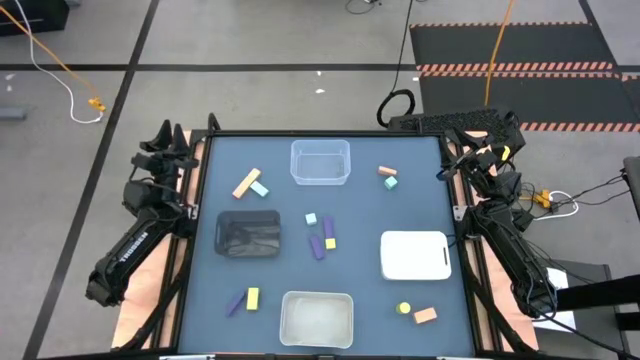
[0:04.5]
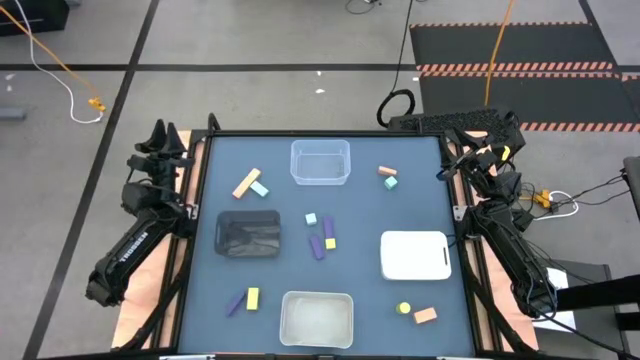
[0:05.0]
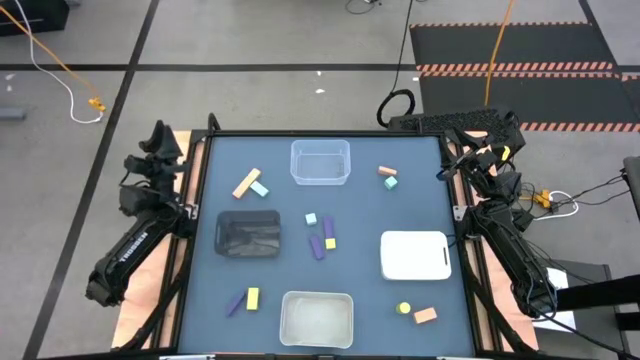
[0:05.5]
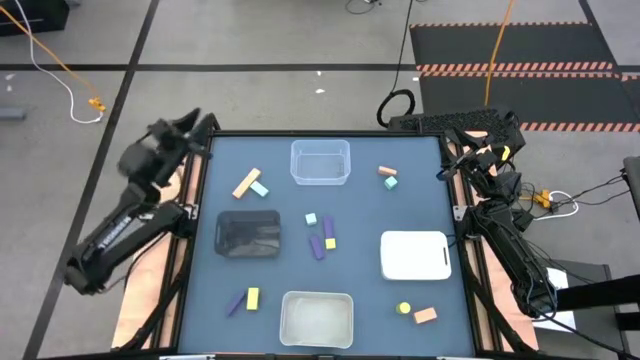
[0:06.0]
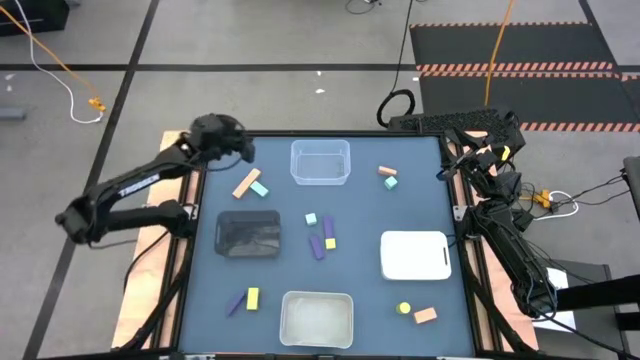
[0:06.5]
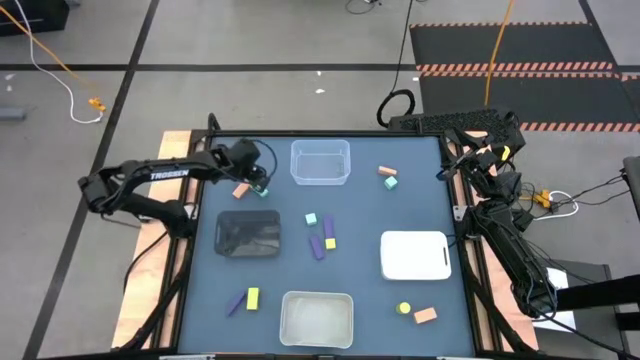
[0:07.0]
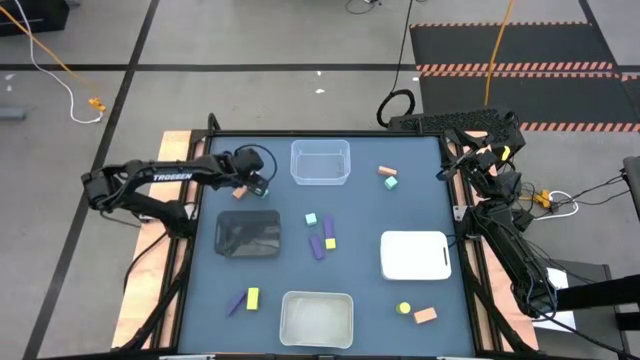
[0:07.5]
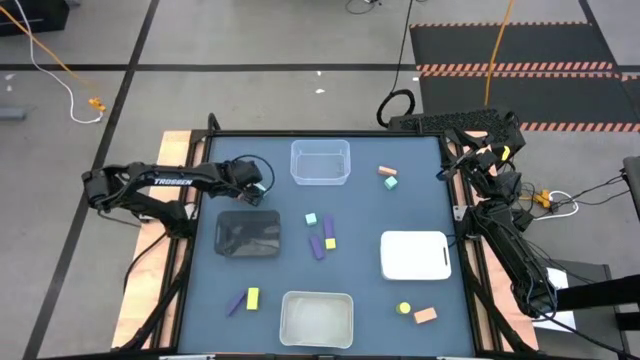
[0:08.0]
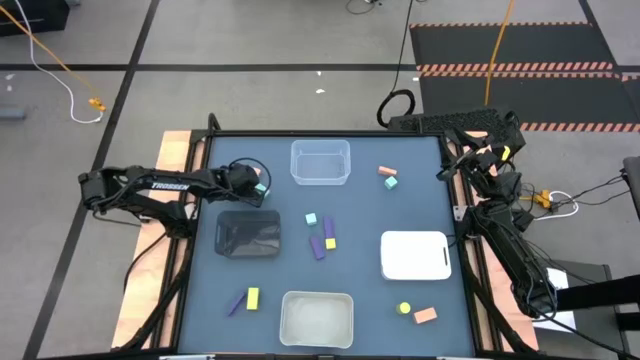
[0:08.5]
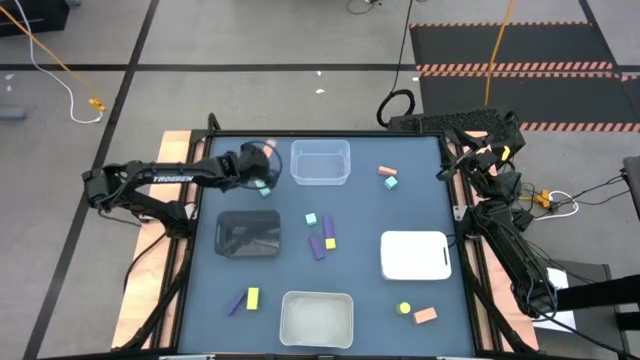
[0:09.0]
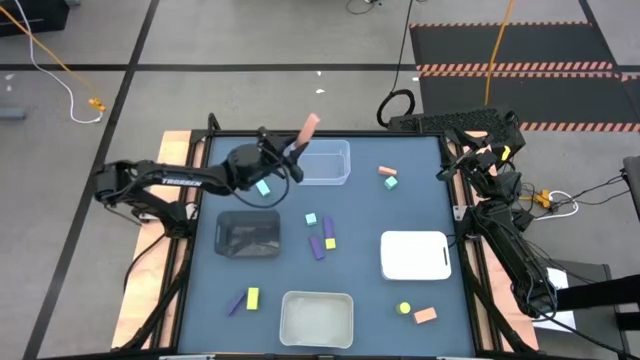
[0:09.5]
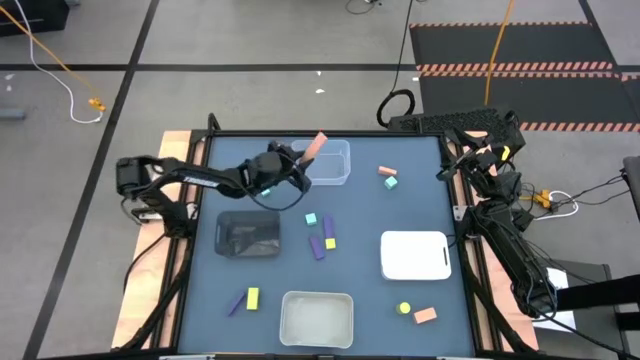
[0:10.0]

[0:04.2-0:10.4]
Task: Sort & place blocks by color
Put the top left orange block into the transparent bin

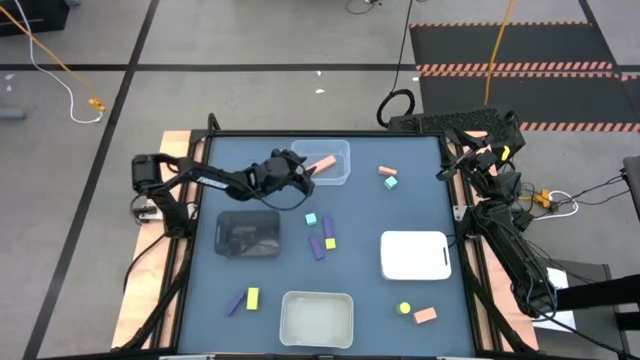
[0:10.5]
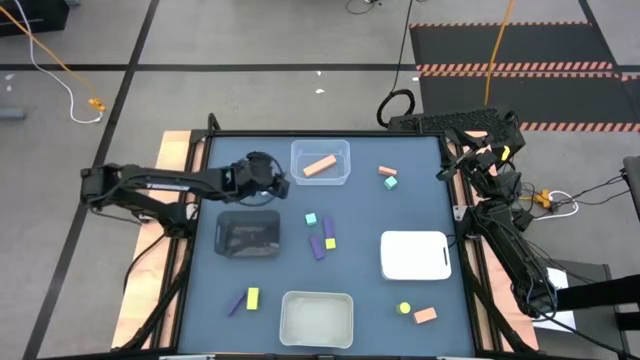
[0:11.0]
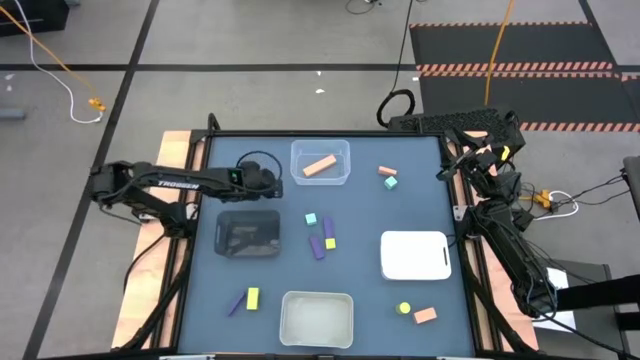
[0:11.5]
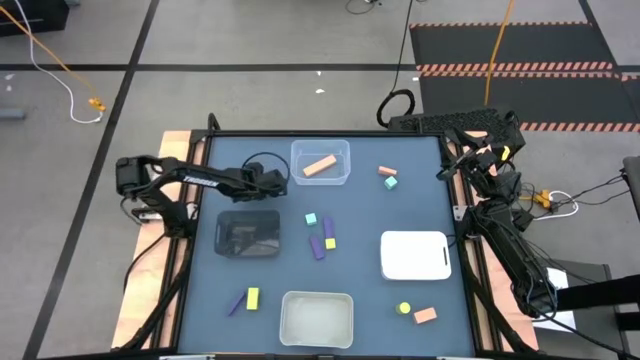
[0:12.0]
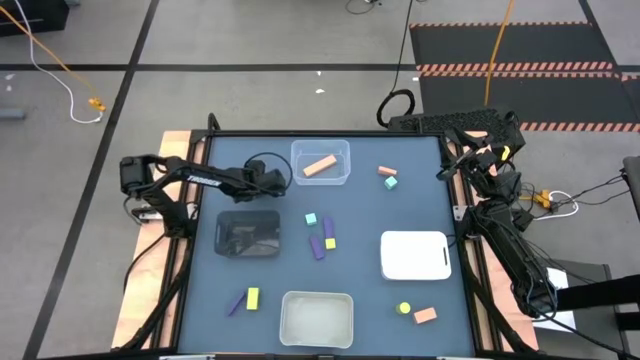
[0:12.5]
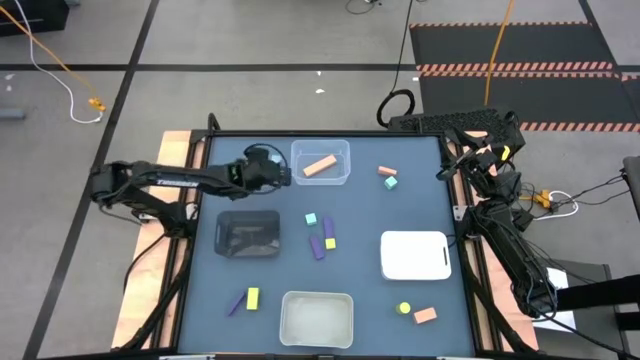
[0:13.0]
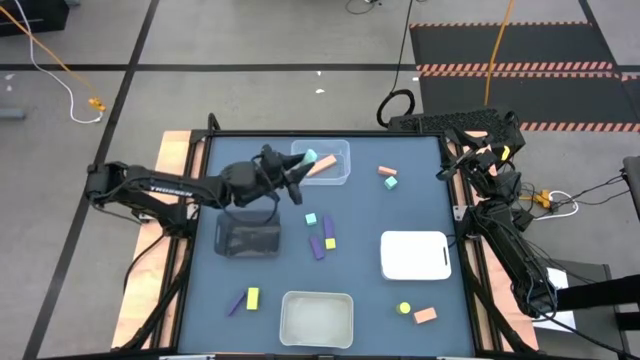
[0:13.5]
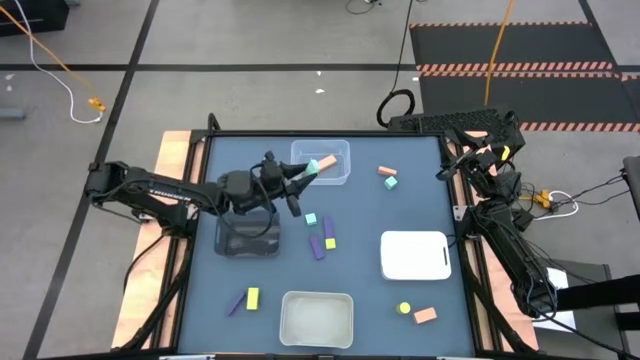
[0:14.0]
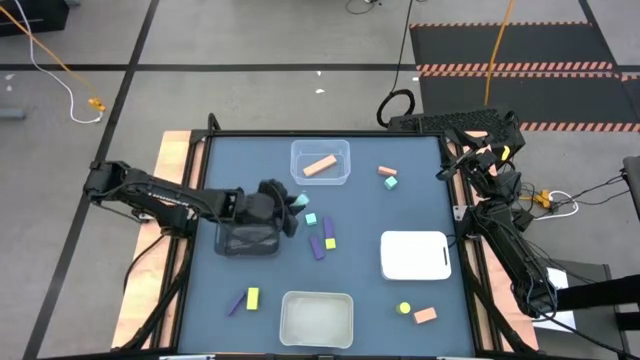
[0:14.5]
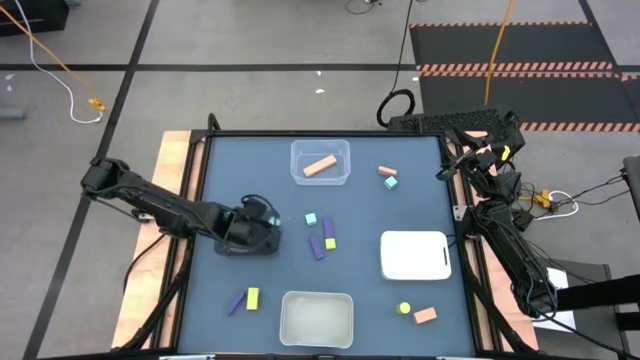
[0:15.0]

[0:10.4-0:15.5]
Put the top left blue block into the black bin

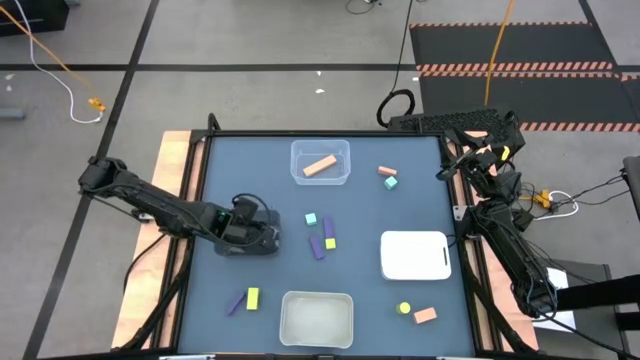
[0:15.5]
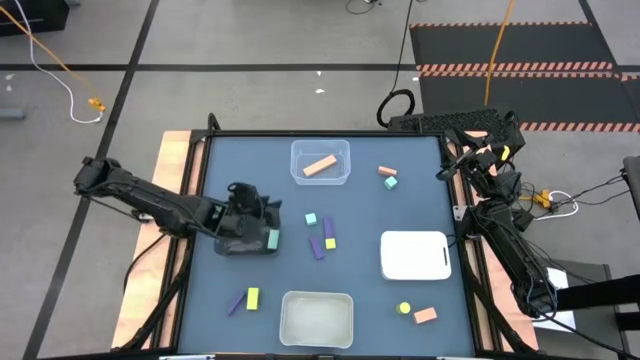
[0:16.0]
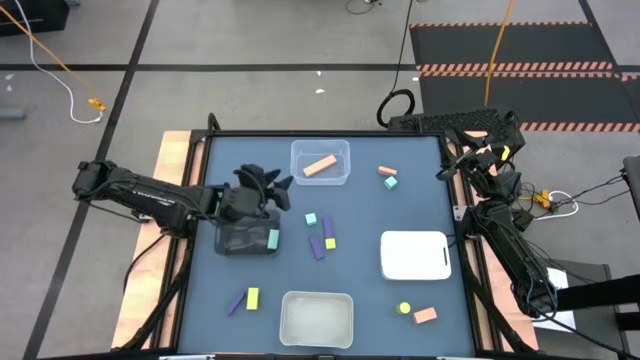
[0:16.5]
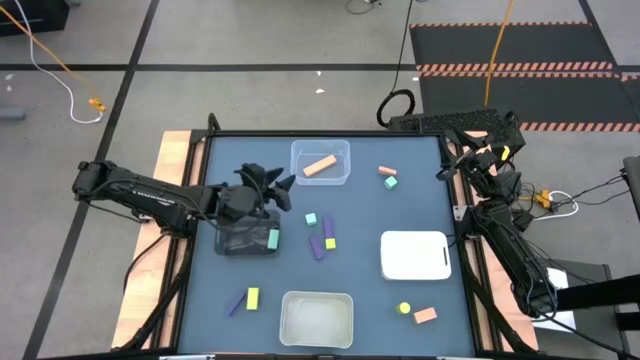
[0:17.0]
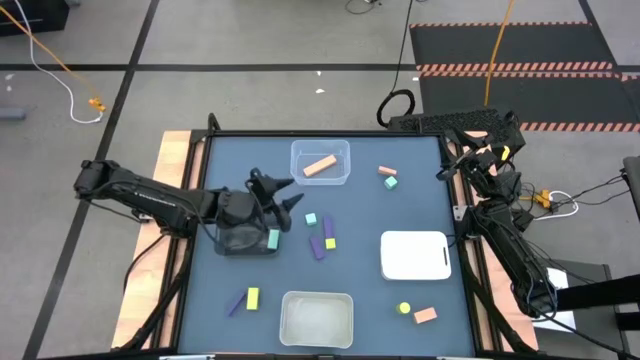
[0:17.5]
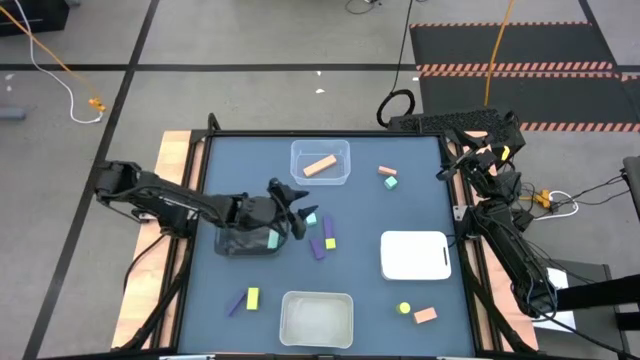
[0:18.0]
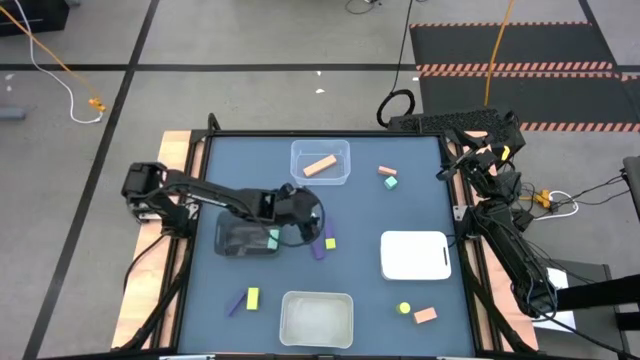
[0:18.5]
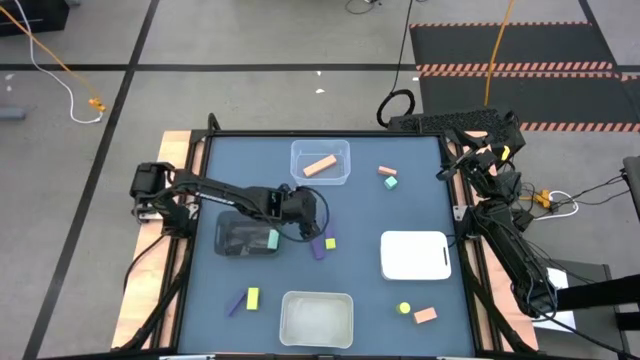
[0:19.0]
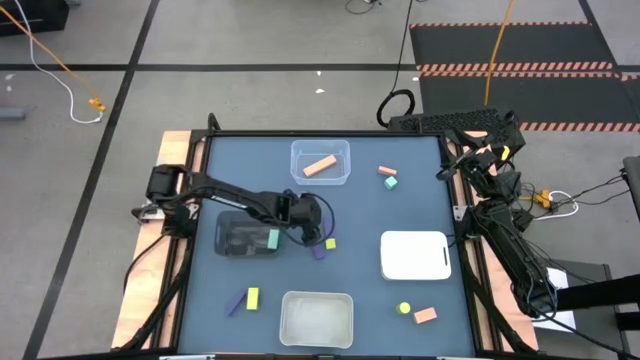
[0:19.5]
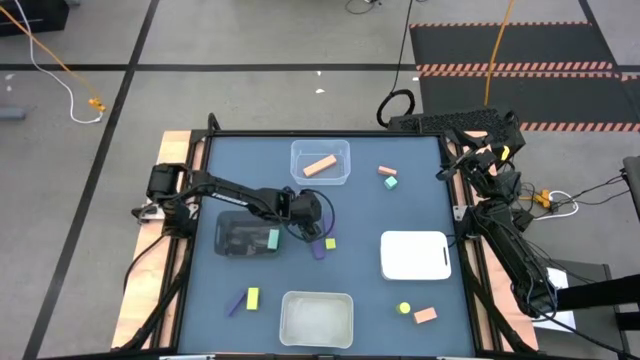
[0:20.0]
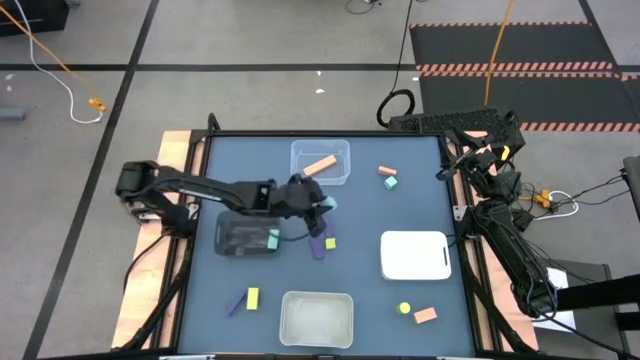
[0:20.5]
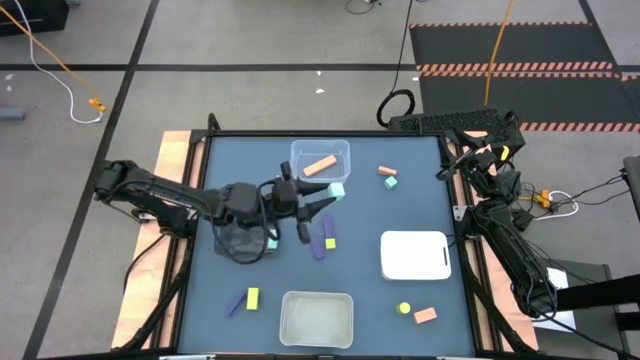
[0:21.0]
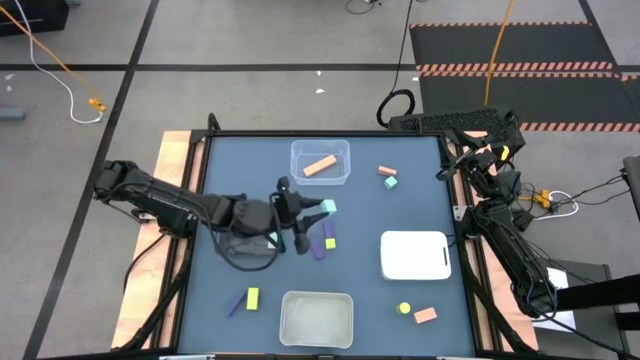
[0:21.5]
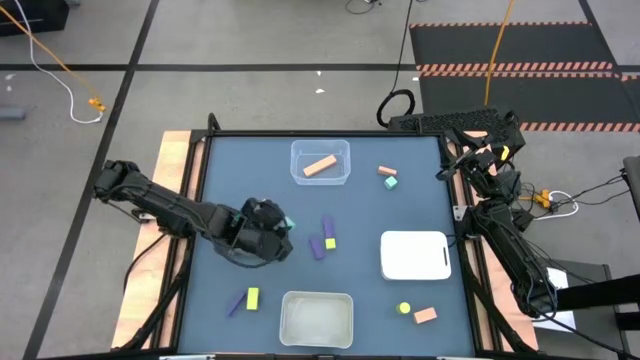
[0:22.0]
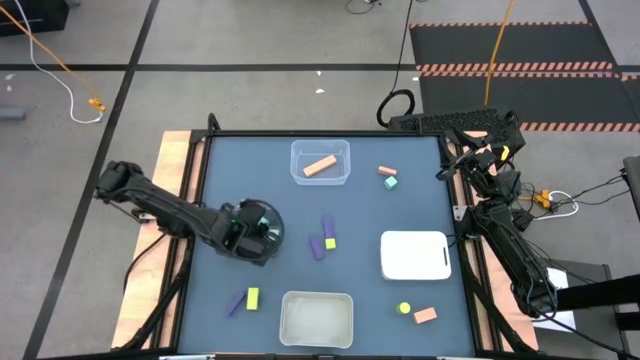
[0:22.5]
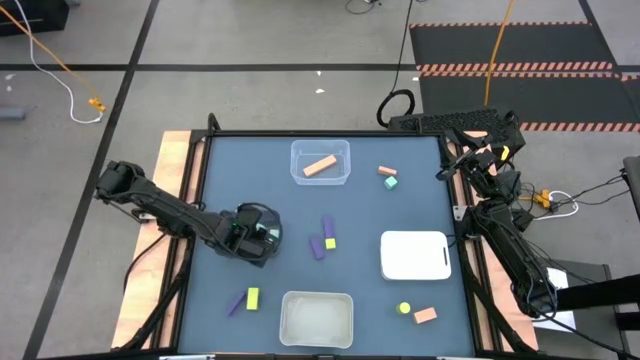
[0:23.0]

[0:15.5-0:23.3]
Put the bottom blue block into the black bin

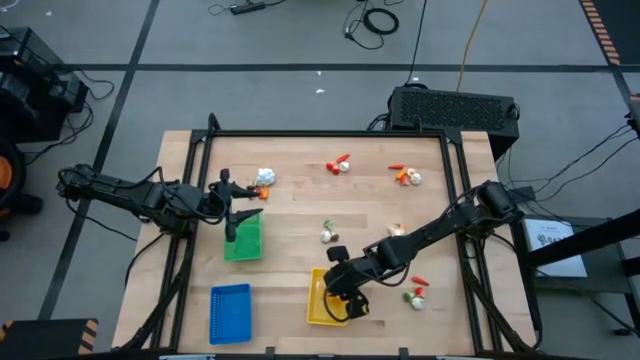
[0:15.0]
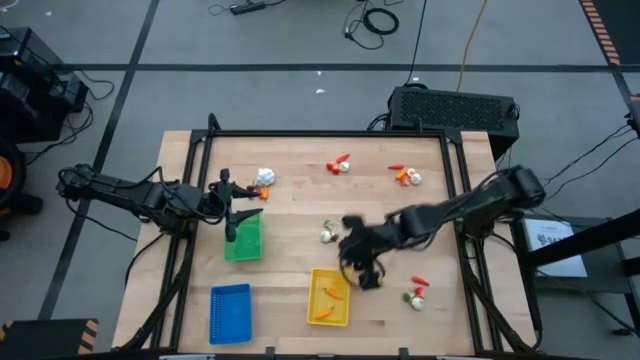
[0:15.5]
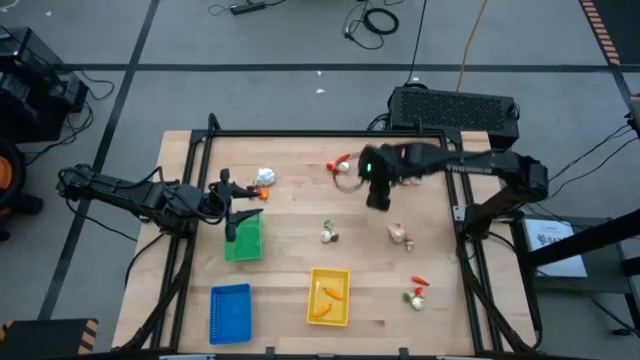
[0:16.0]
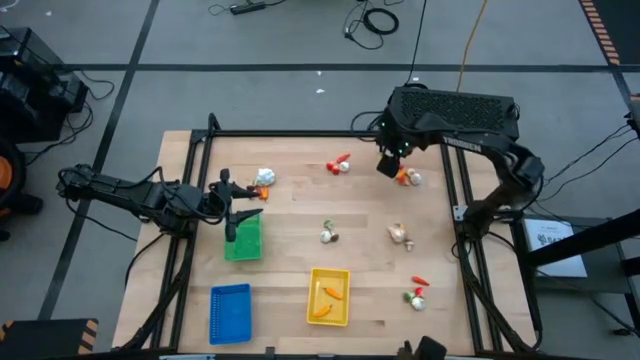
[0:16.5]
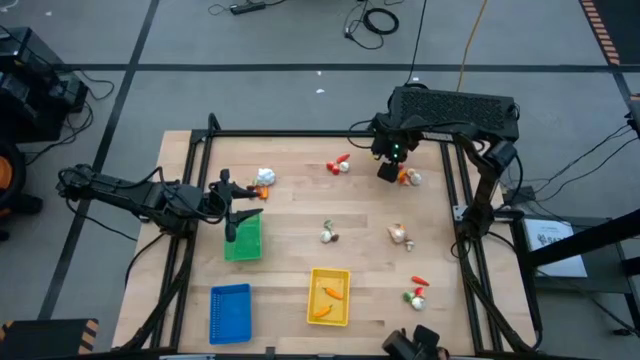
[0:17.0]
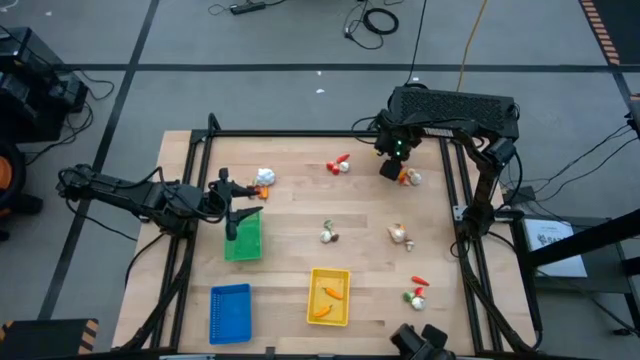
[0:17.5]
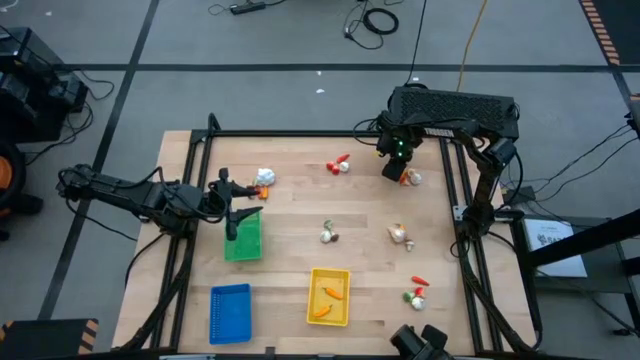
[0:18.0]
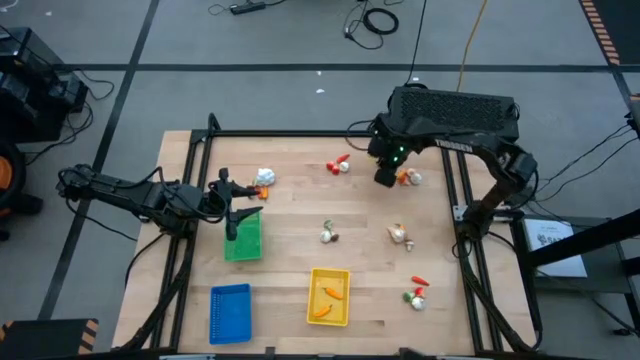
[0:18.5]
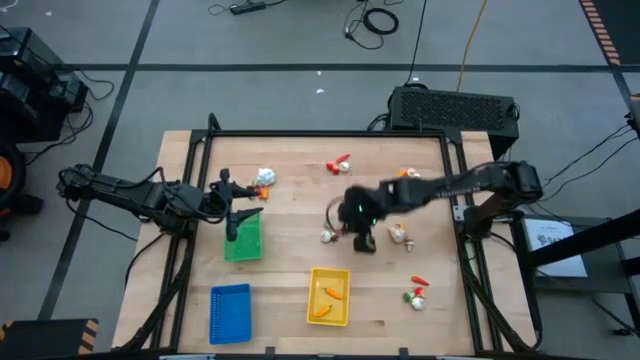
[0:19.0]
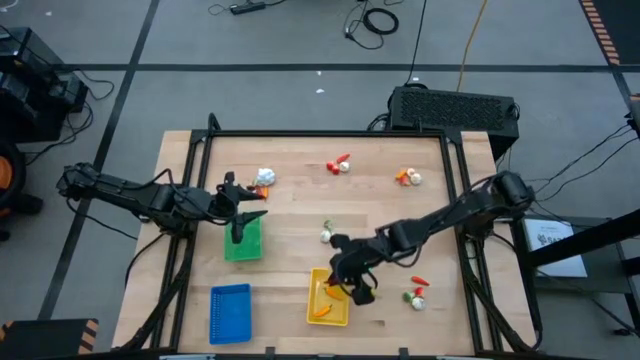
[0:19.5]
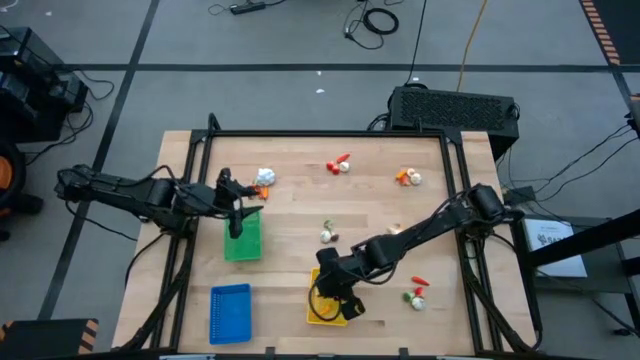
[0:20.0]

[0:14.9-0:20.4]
Task: Sort produce into baskets
Put the red chili pepper into the yellow basket
